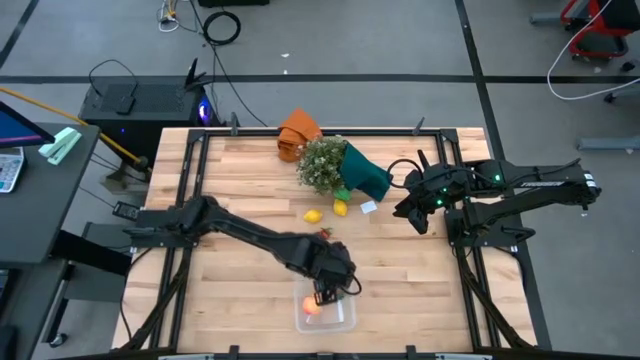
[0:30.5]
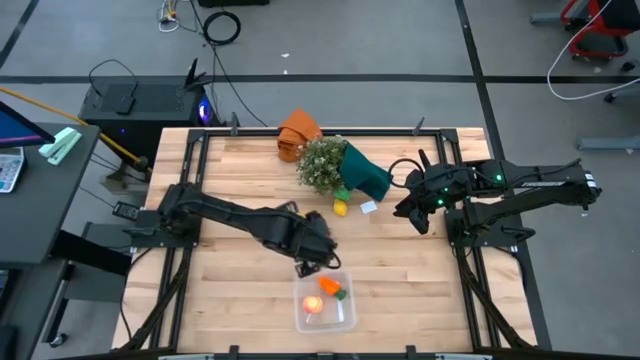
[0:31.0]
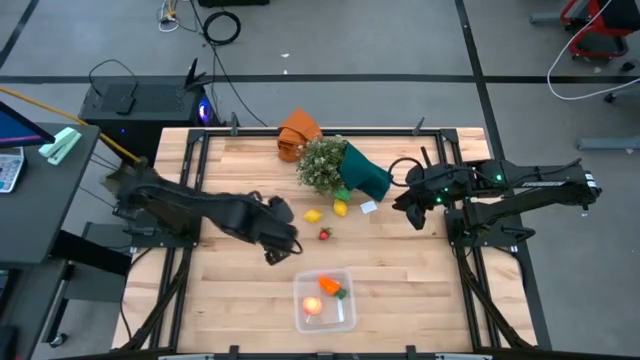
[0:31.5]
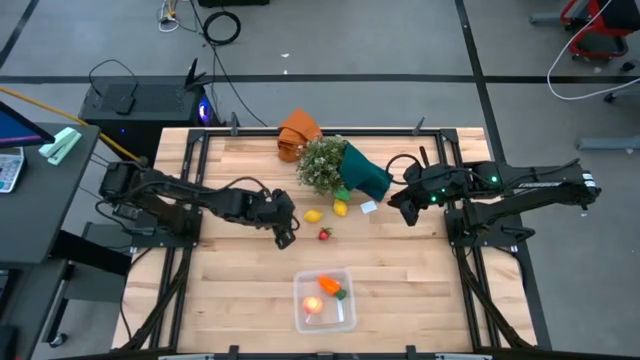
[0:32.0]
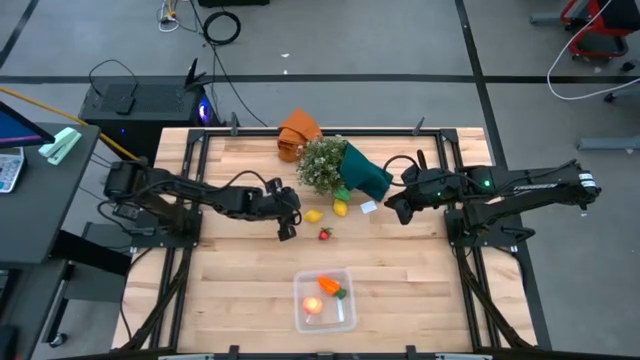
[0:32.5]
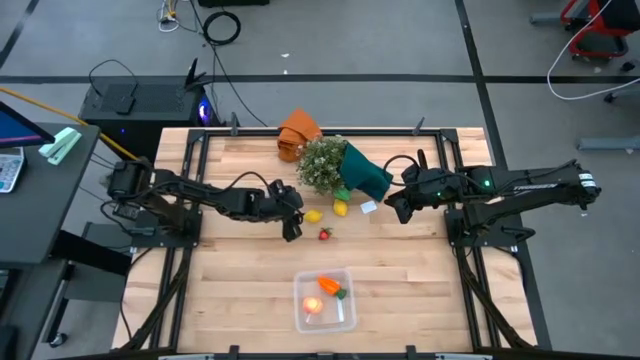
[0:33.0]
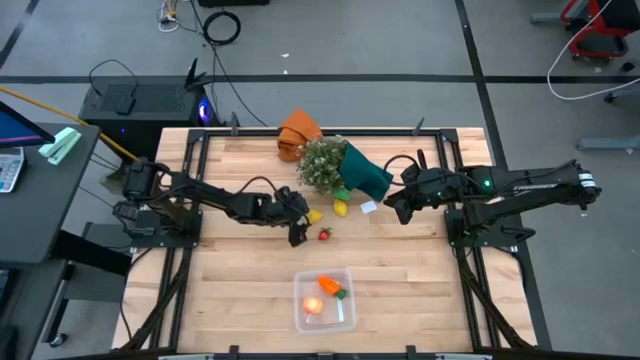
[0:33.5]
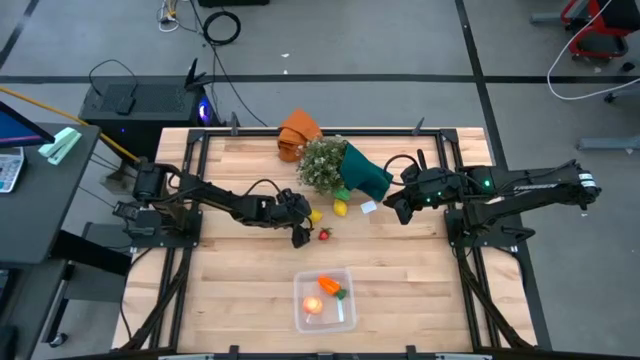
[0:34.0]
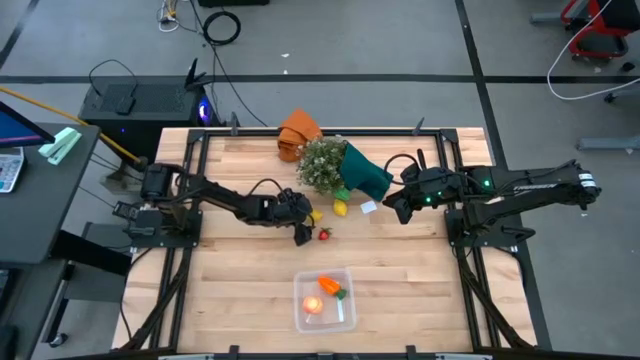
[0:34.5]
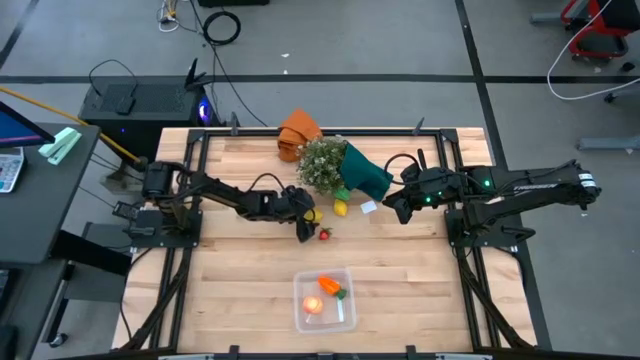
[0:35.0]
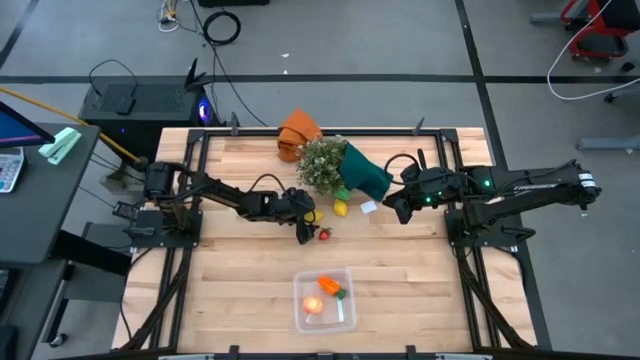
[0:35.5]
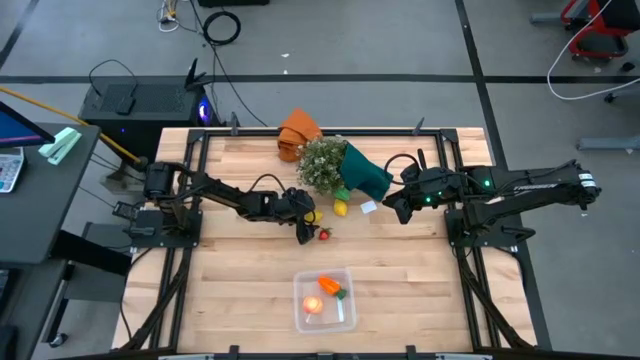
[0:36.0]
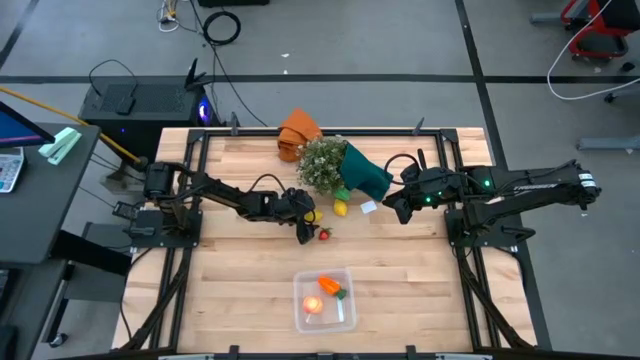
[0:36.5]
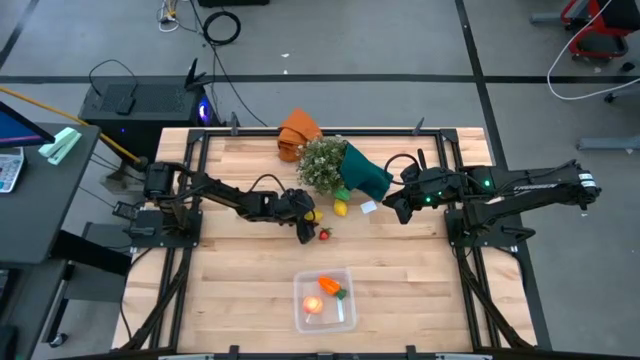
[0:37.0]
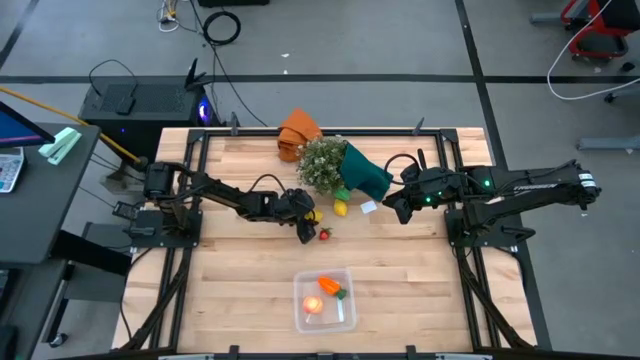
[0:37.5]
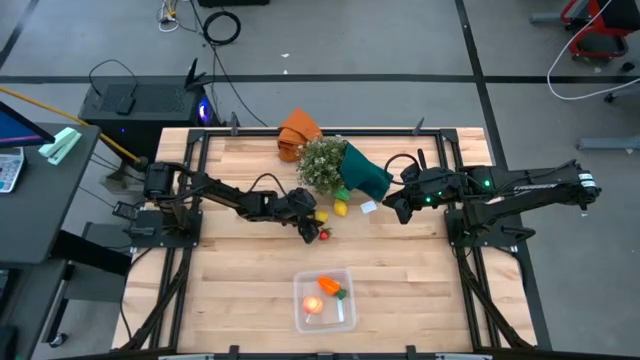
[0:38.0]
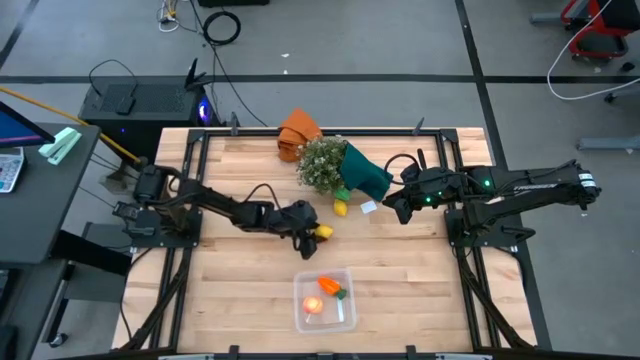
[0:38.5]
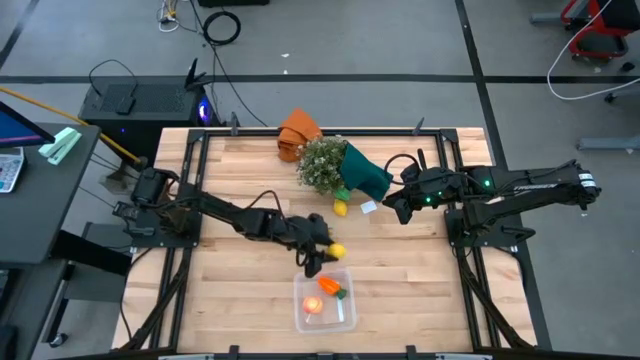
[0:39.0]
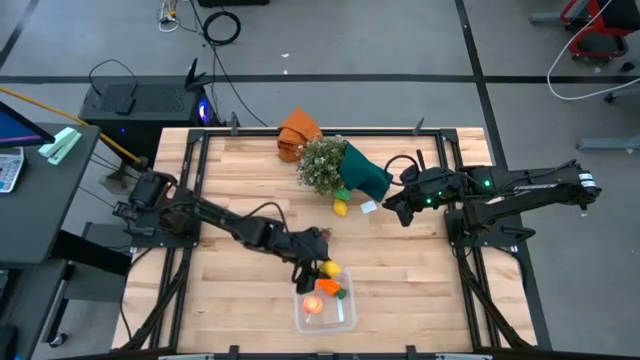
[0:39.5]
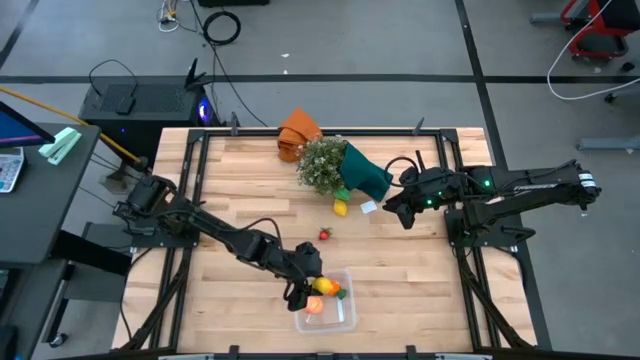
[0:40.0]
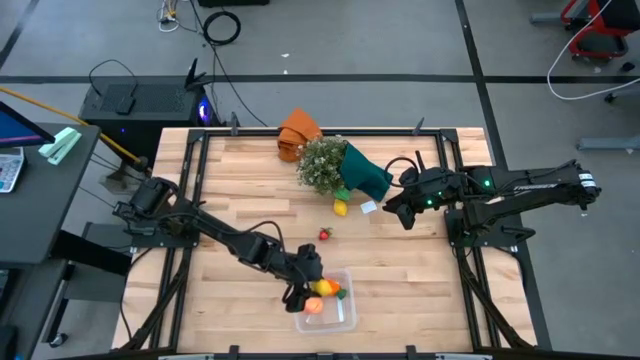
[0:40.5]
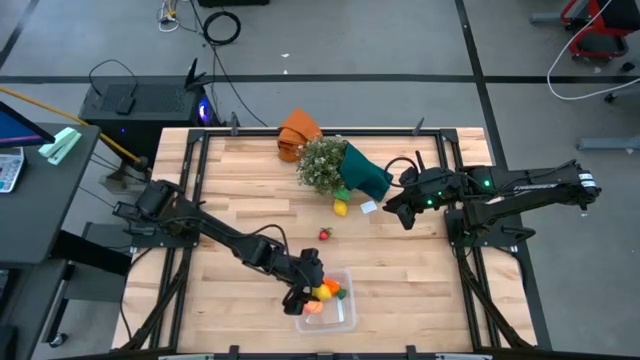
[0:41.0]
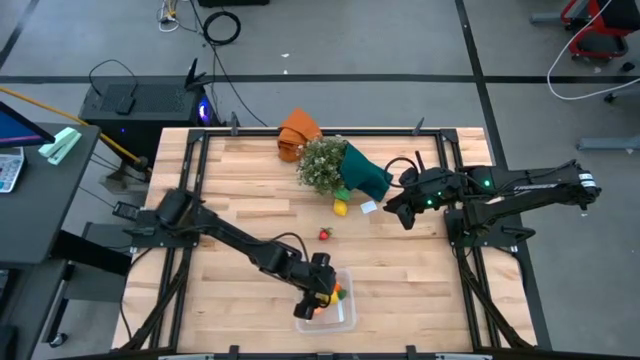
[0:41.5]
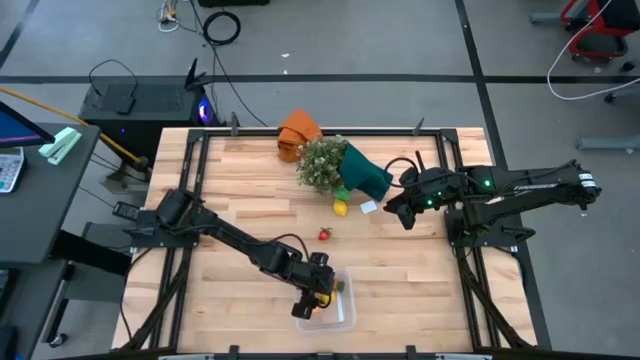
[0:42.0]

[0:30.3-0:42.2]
Task: Pick and placing Produce into tupperware
Put the left lemon into the transparent container

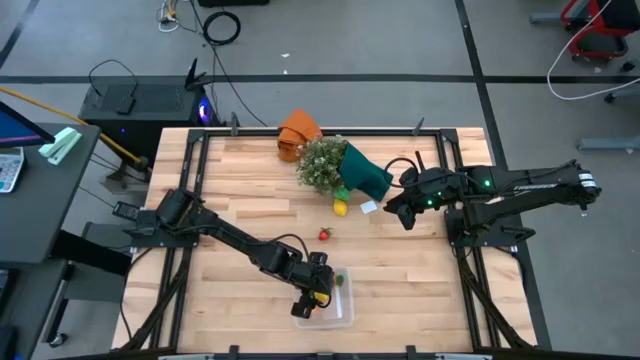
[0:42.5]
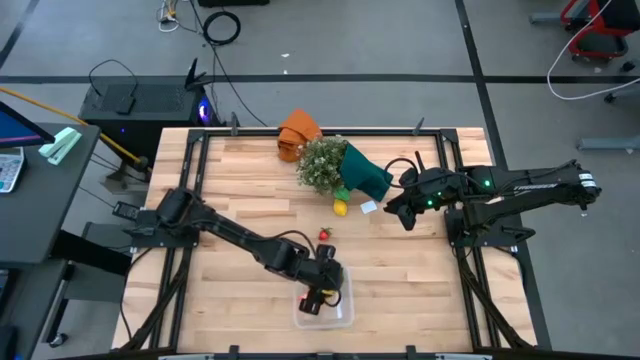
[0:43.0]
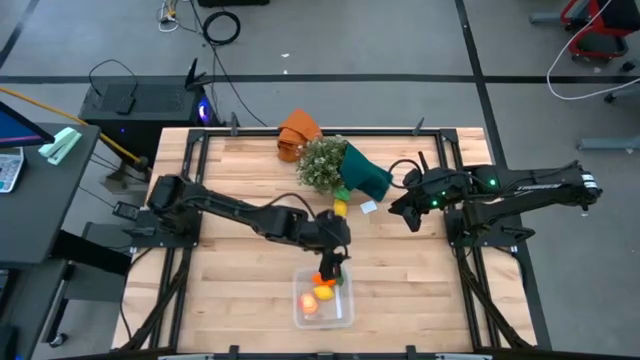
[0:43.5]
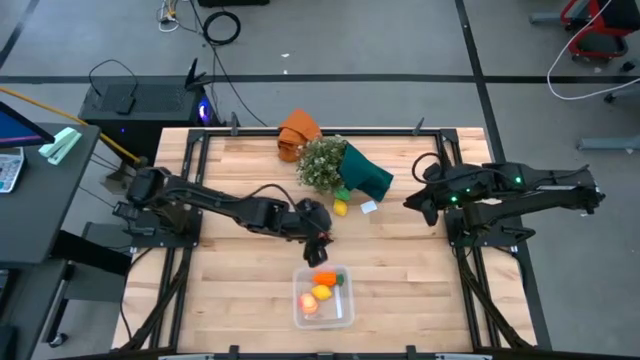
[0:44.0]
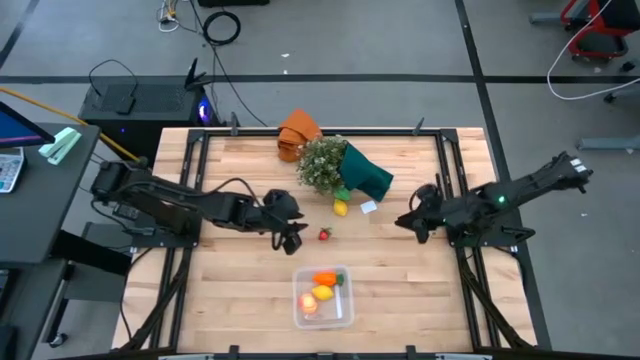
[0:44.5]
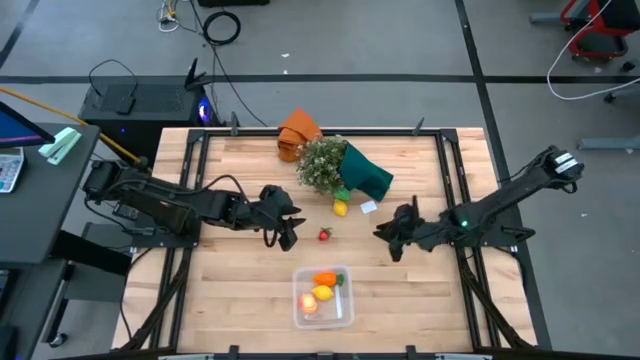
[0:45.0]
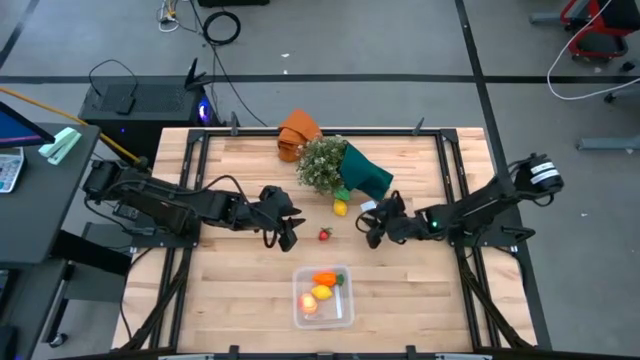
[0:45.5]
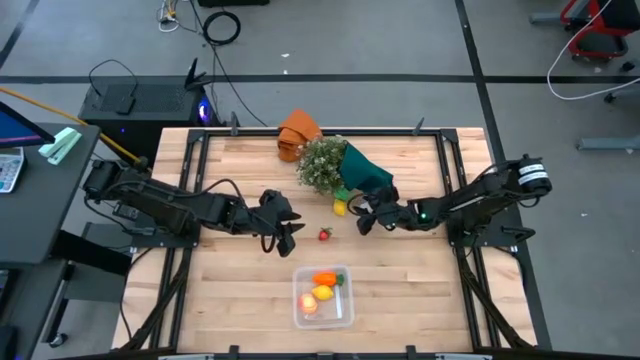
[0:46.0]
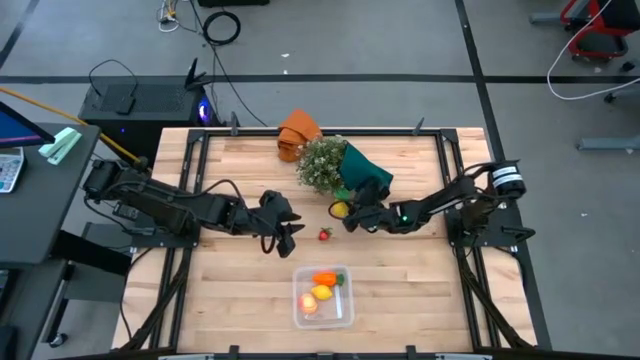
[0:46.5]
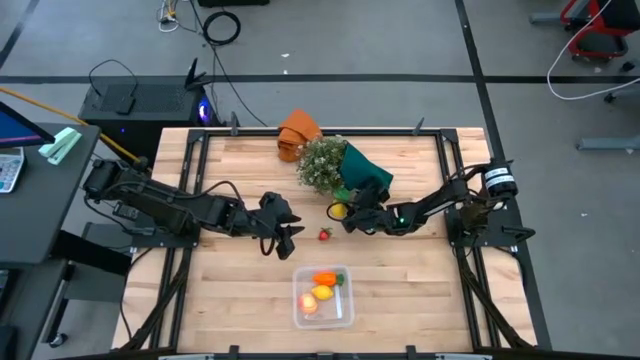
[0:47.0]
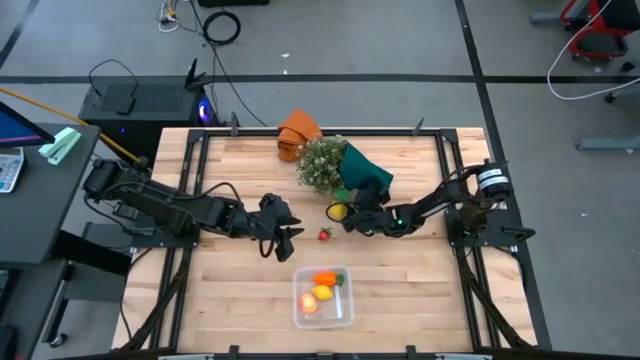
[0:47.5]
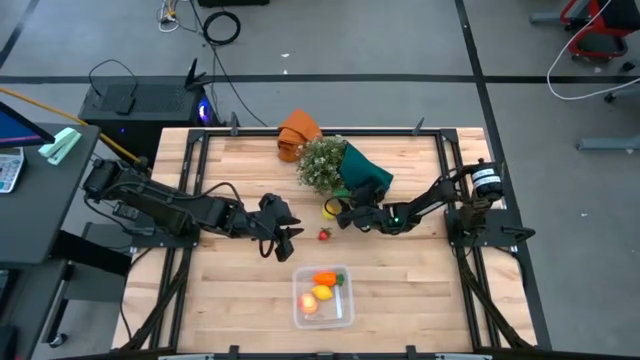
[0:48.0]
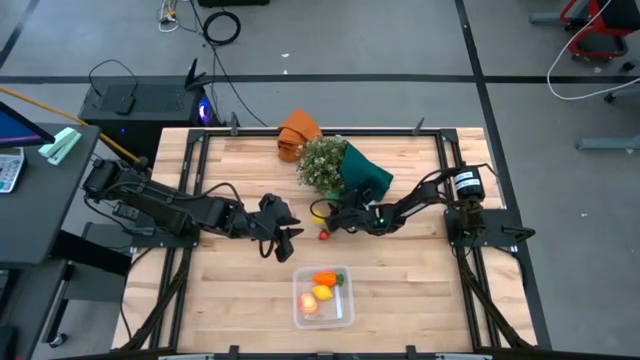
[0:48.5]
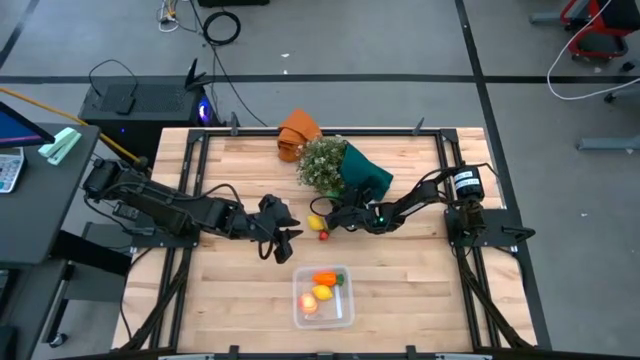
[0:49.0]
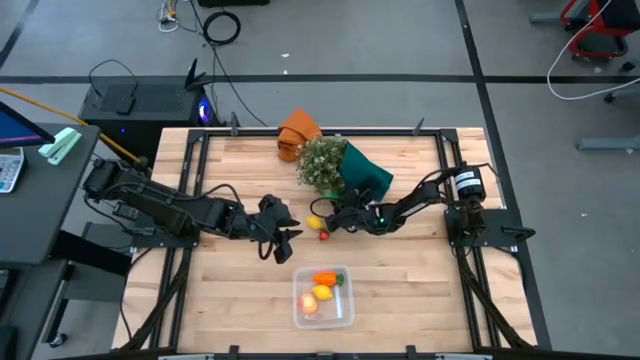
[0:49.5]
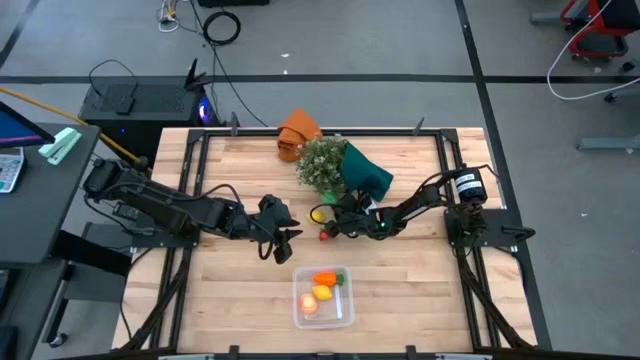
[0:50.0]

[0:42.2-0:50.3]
Put the pear into the transparent container
